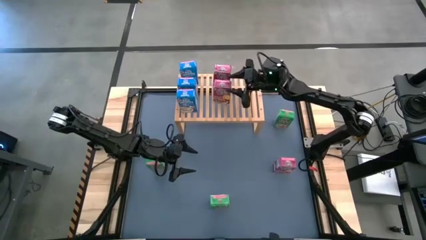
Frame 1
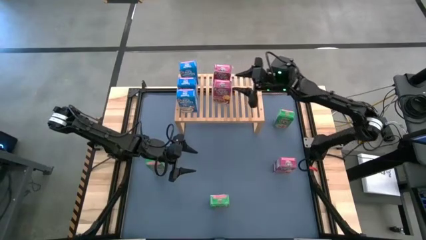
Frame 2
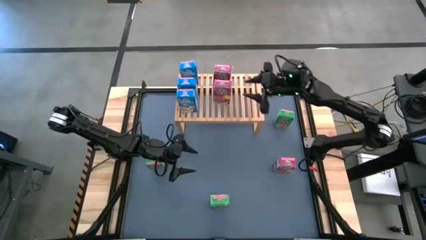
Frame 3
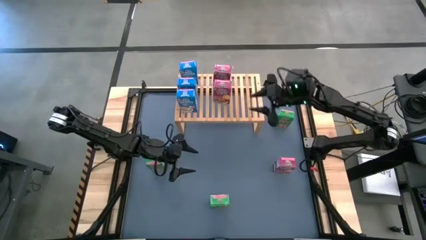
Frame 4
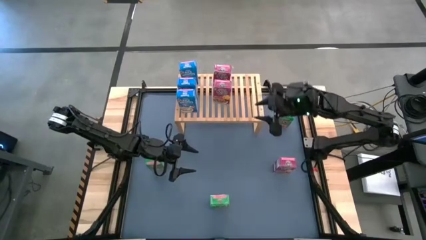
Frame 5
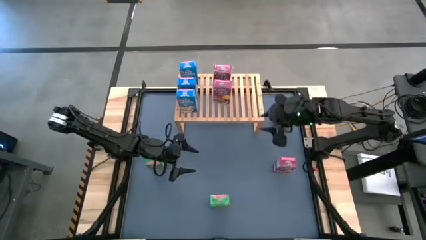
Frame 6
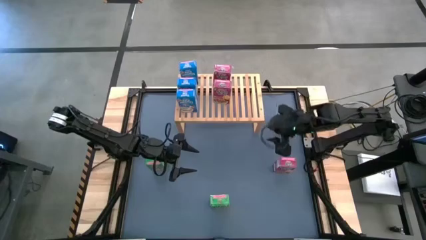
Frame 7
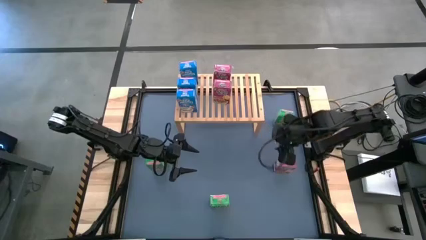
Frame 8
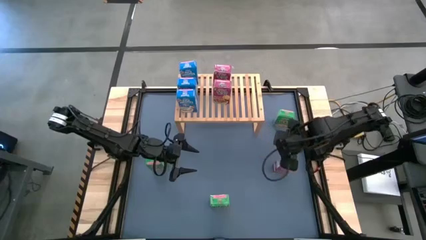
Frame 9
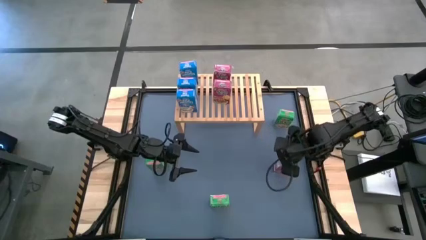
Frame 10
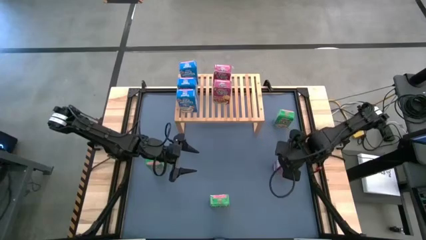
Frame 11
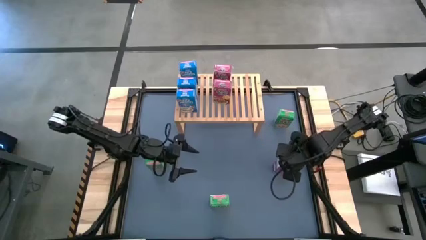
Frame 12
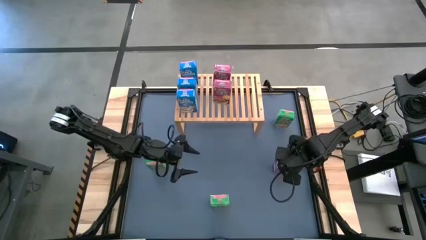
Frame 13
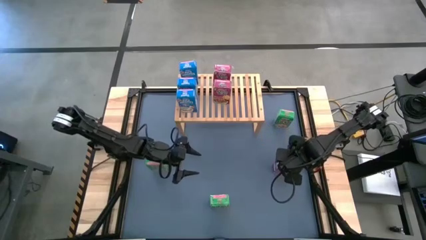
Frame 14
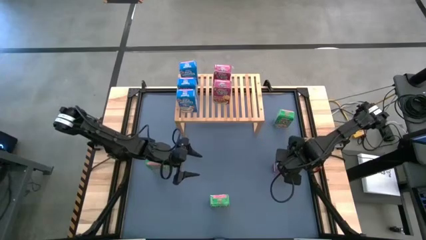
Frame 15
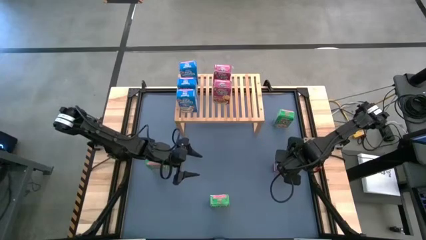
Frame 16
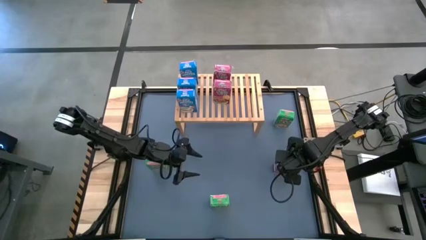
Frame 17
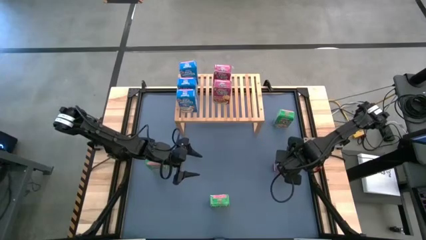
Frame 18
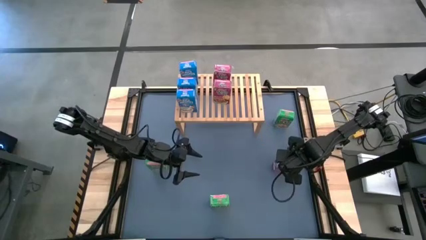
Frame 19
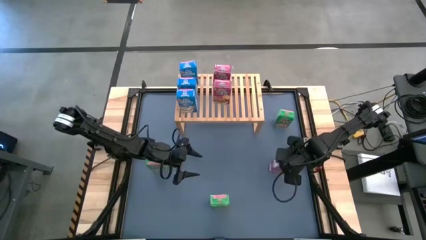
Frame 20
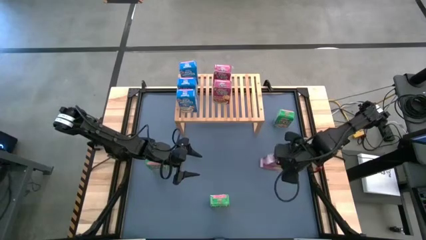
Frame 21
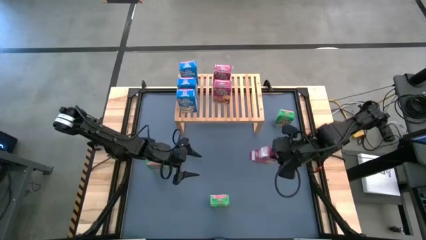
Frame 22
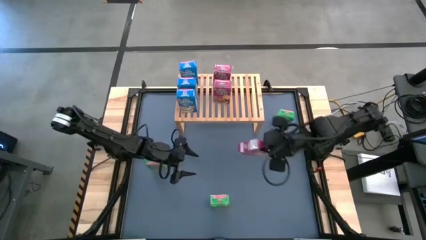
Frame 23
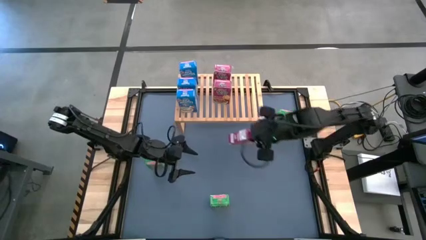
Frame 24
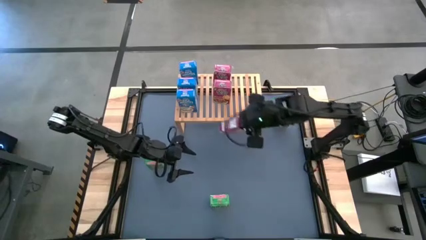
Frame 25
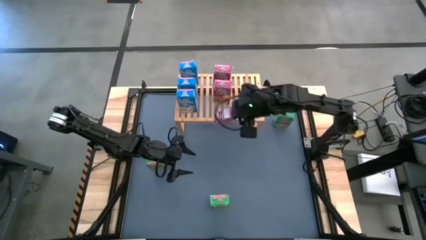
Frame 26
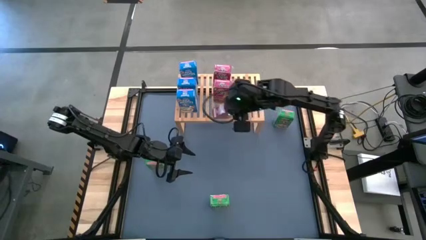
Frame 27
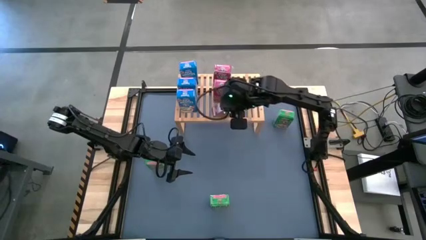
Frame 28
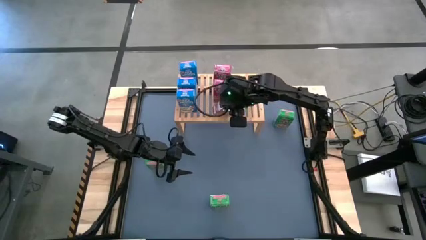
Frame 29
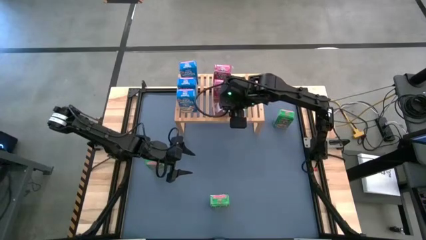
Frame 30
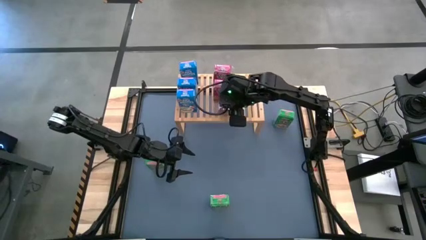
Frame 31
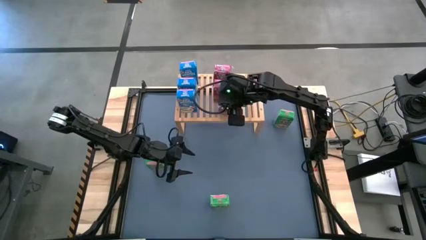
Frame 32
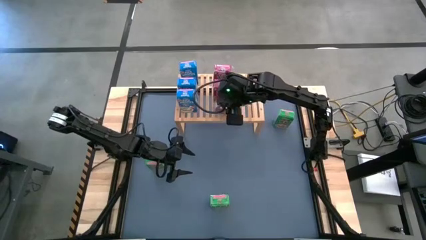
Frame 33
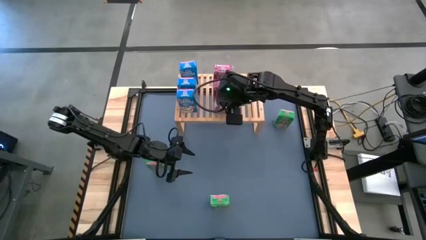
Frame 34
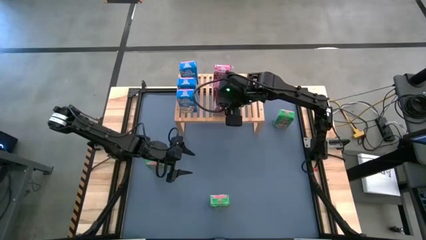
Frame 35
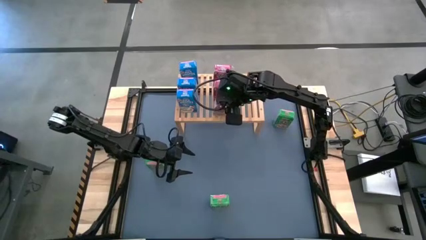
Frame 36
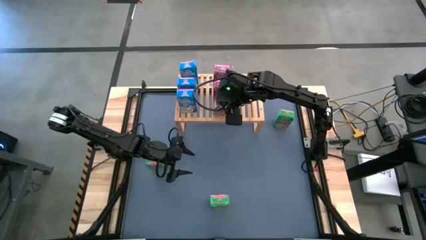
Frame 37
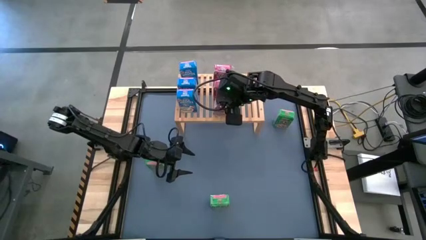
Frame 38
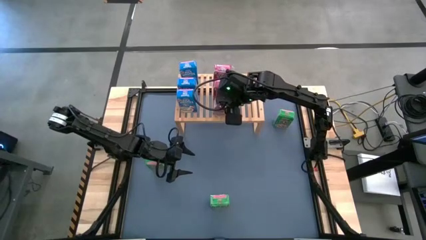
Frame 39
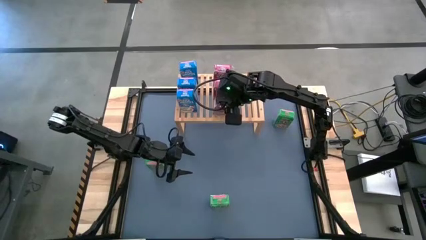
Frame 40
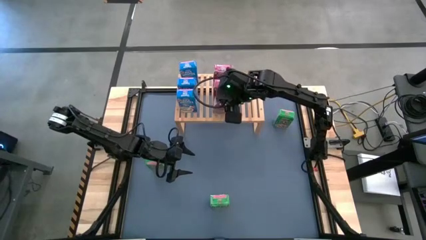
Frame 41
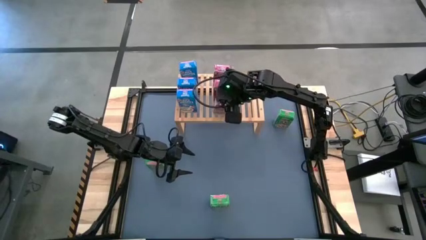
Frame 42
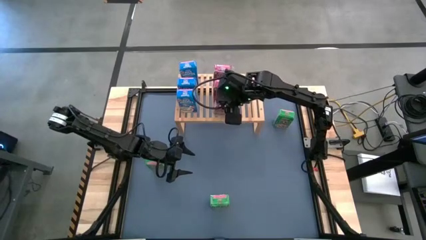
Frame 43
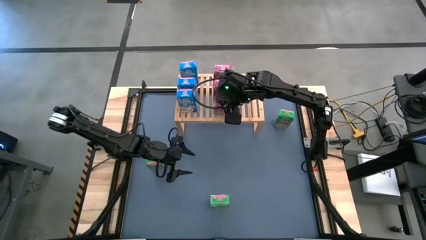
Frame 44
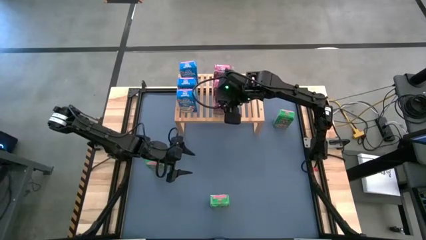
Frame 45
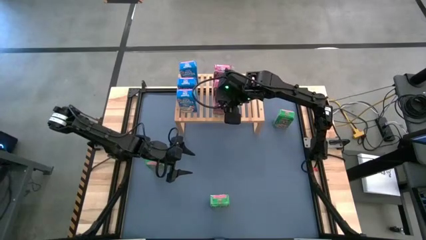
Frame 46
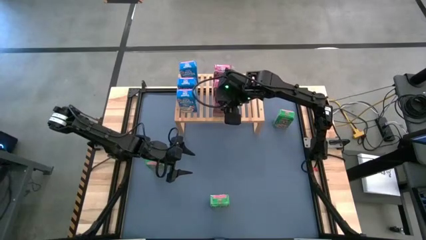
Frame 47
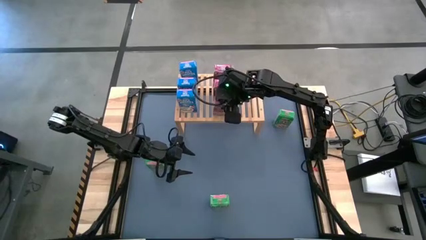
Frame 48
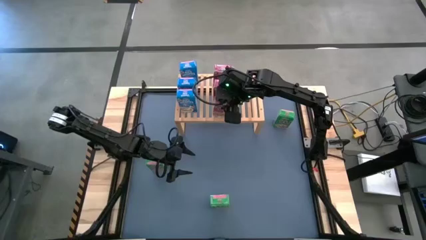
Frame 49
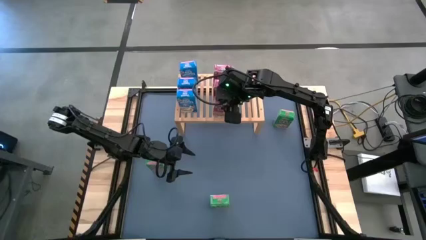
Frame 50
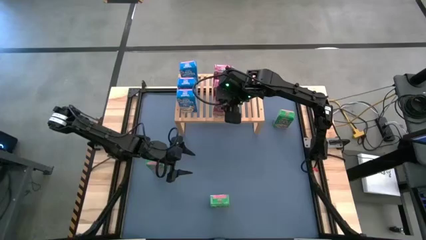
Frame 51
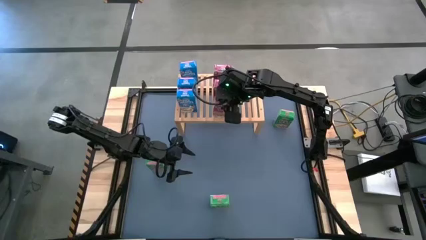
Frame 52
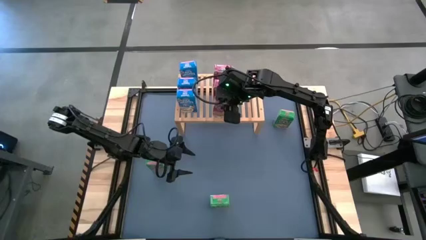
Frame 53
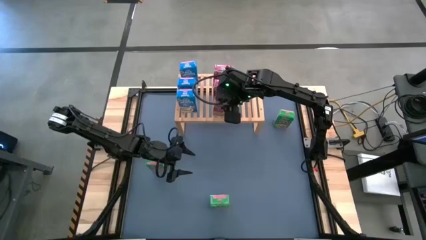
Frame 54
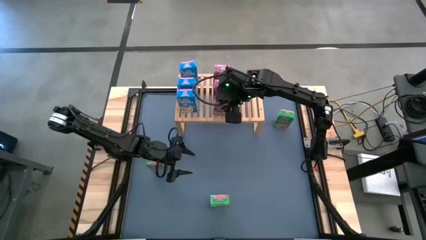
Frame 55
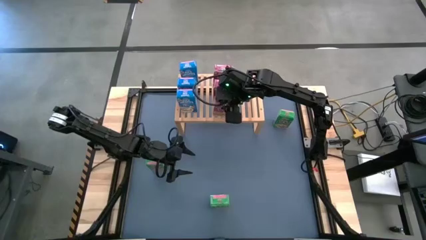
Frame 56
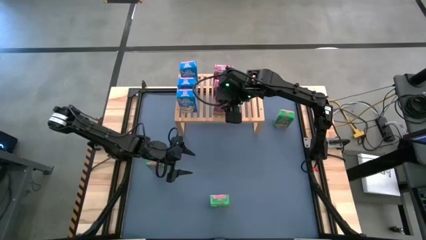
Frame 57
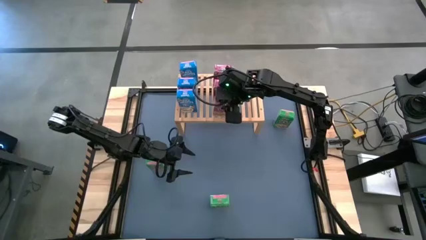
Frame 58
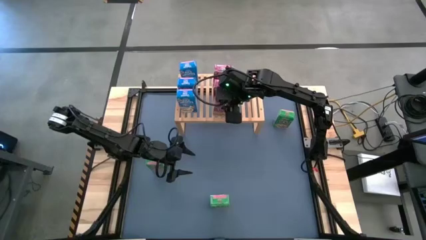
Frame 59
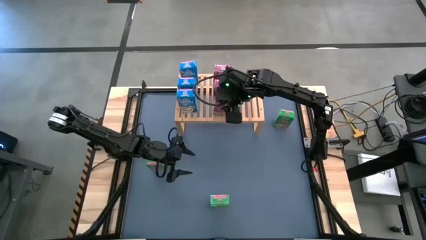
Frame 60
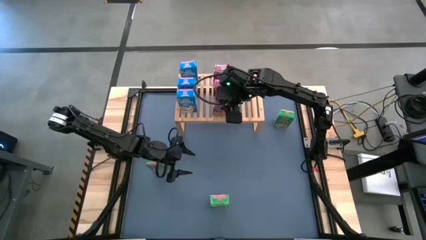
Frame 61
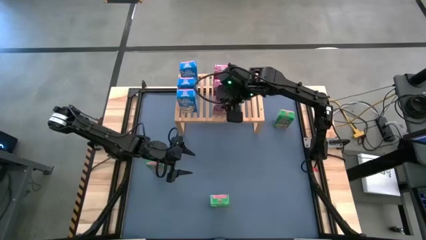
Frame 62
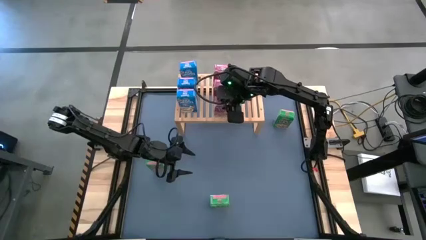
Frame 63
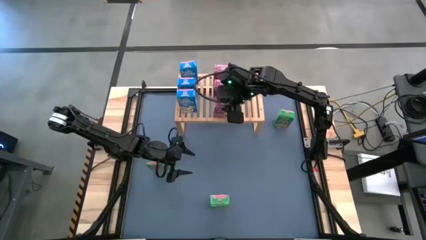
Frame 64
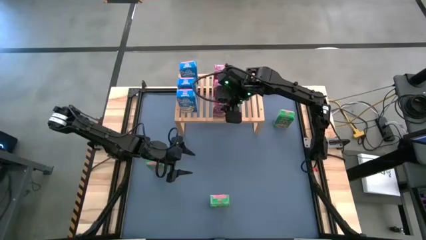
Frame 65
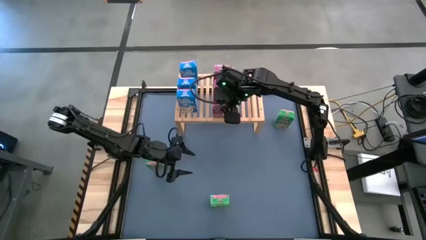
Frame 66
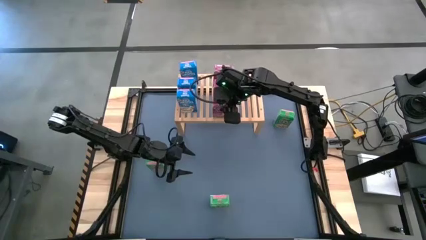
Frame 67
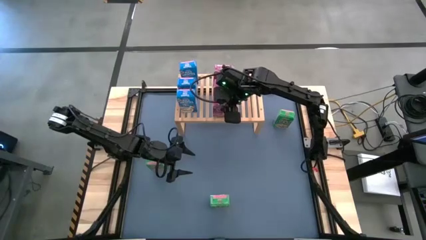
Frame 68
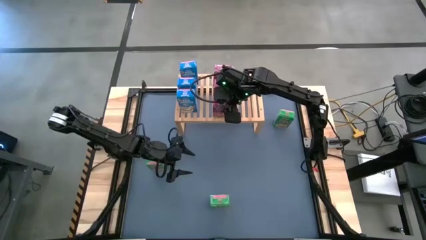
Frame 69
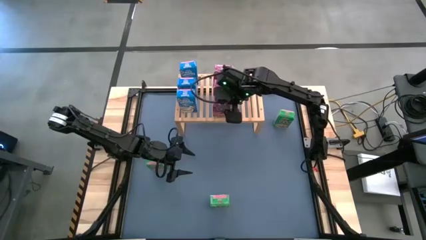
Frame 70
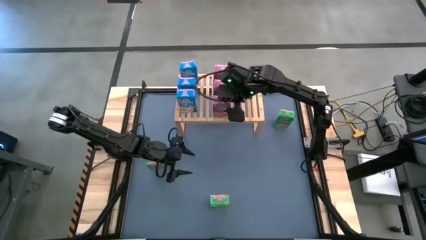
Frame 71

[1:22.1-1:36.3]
Task: Stack cereal on shelf
Put the pink cereal box on the shelf aligned with the other pink cereal boxes

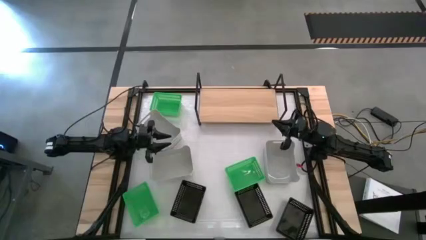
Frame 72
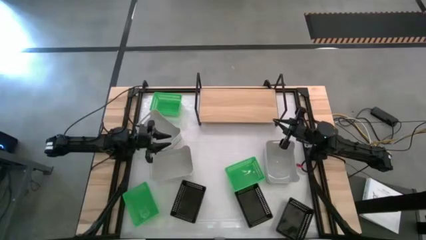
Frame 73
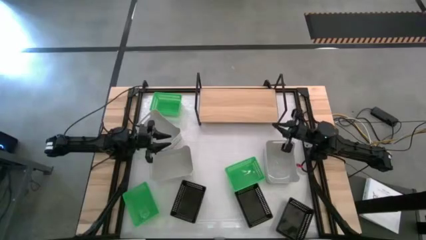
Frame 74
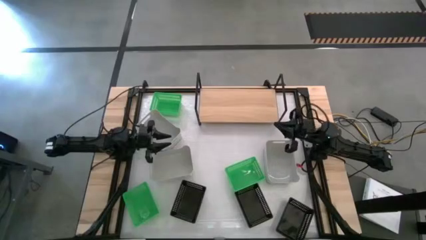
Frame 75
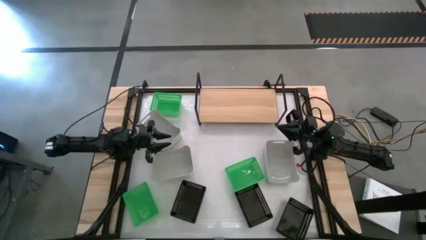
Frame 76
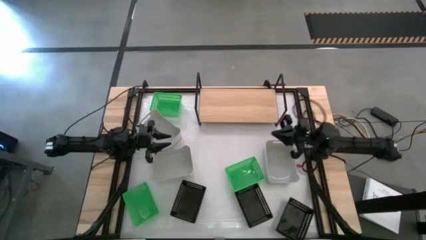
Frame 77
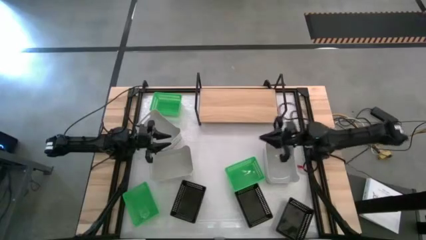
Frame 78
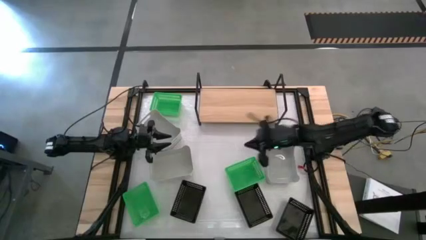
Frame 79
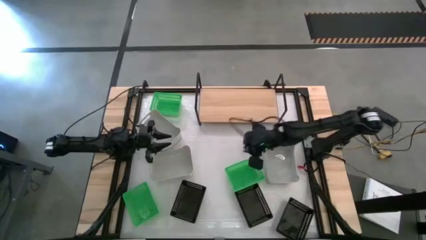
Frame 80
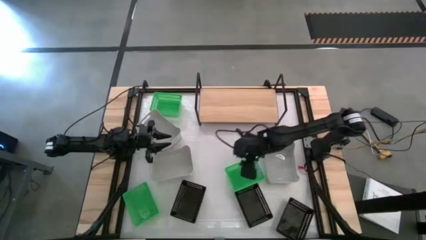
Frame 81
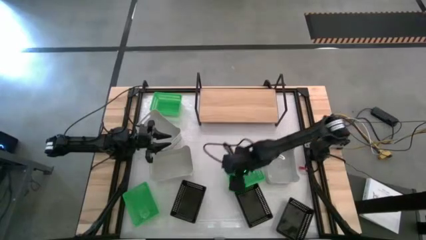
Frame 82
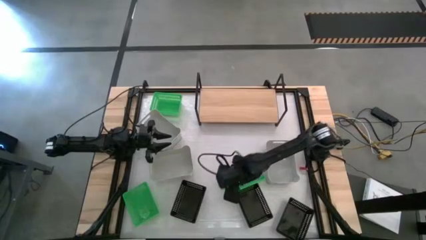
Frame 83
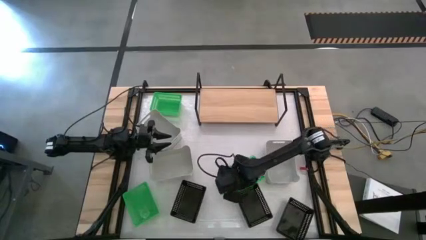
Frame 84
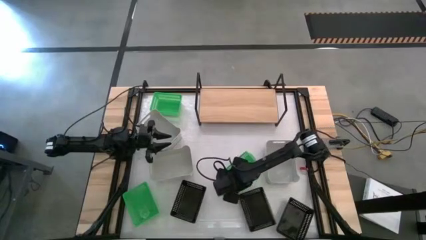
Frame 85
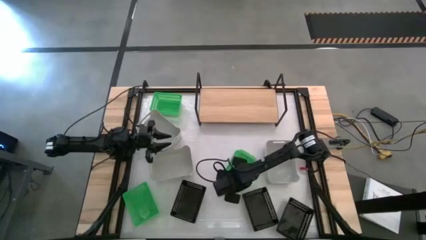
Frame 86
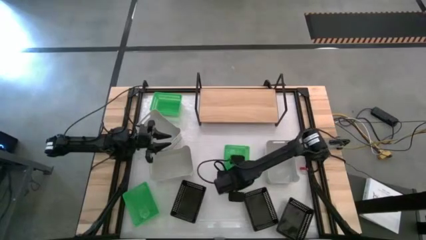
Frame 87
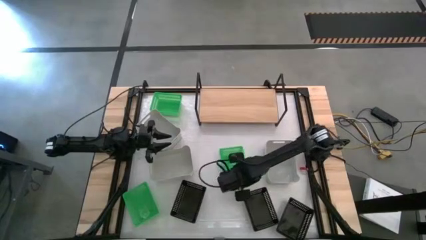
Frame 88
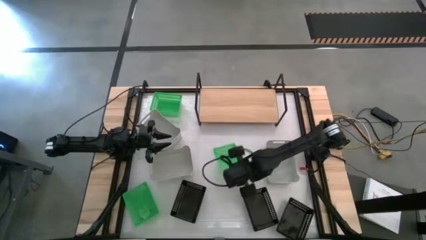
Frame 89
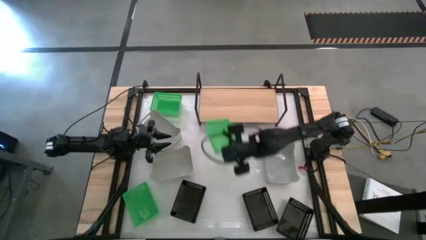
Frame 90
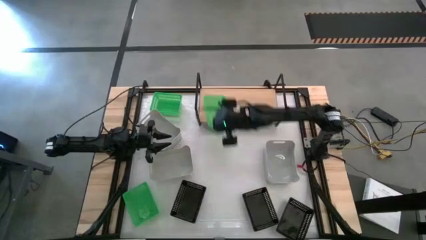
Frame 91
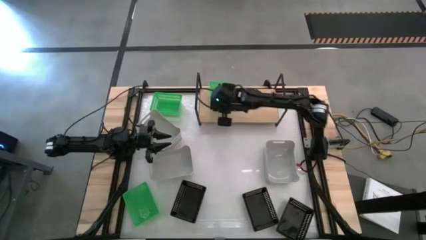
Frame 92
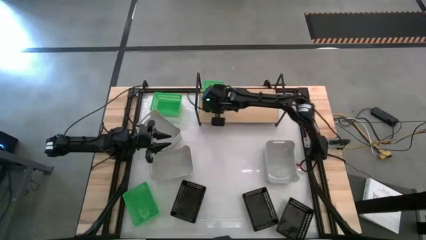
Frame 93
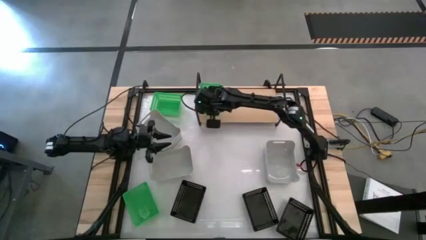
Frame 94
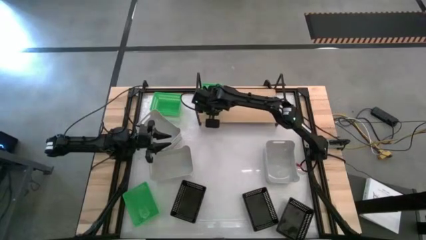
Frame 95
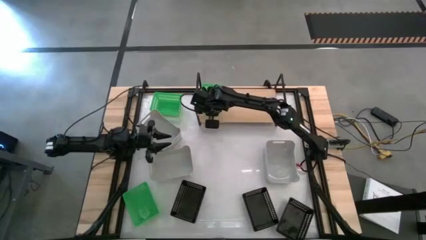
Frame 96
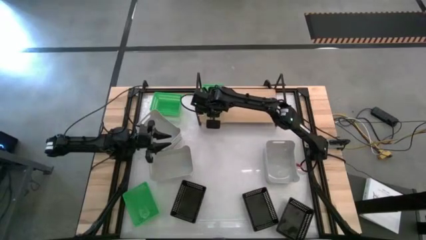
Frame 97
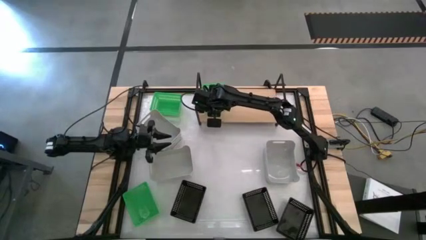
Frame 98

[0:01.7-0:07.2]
Task: Stack baskets on shelf by color
Put the bottom right green bin on the shelf
